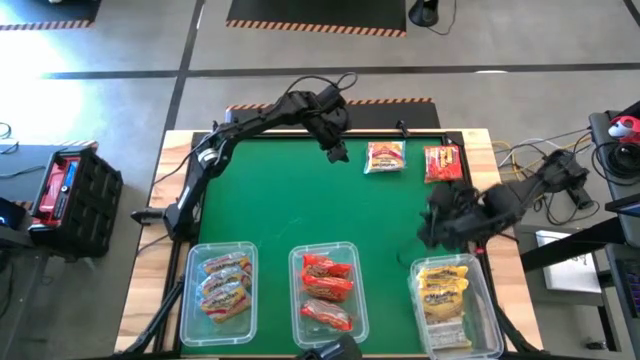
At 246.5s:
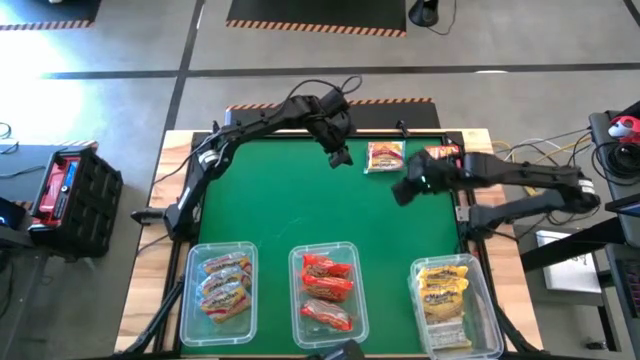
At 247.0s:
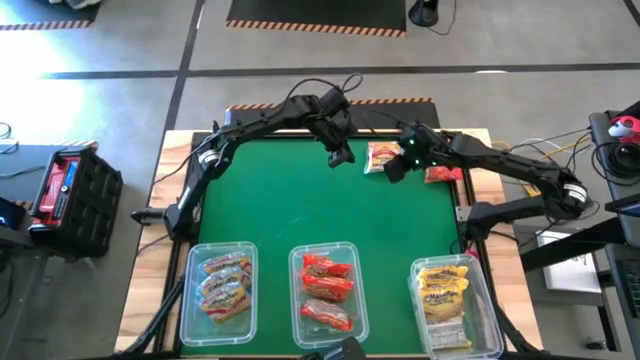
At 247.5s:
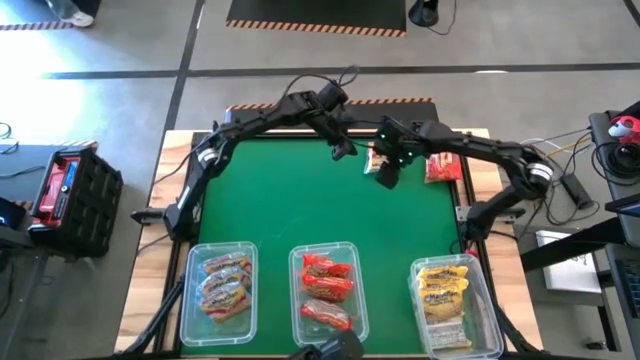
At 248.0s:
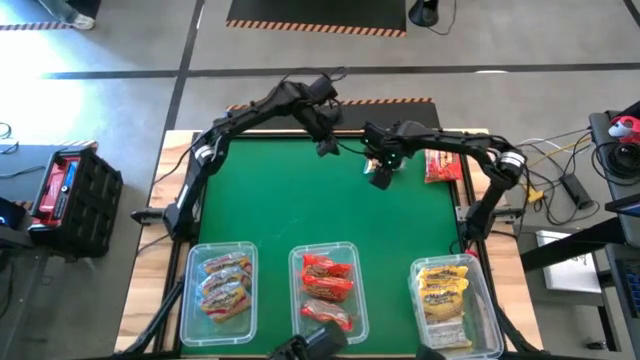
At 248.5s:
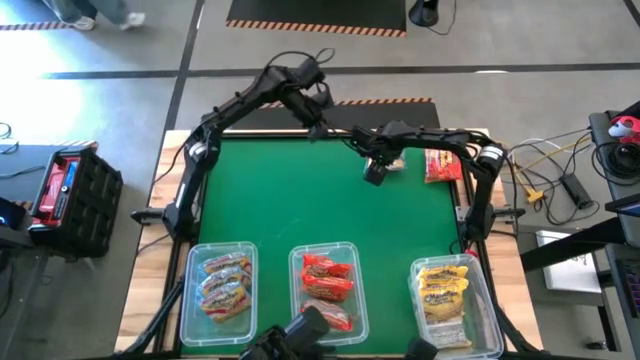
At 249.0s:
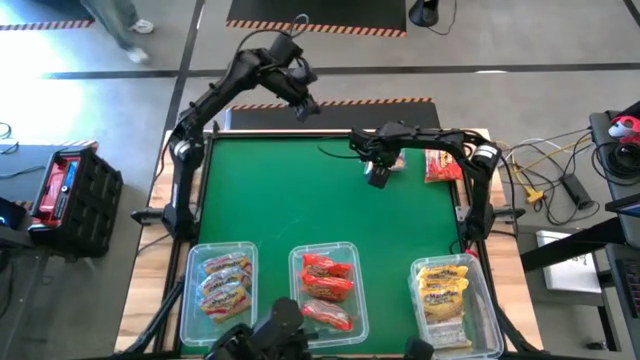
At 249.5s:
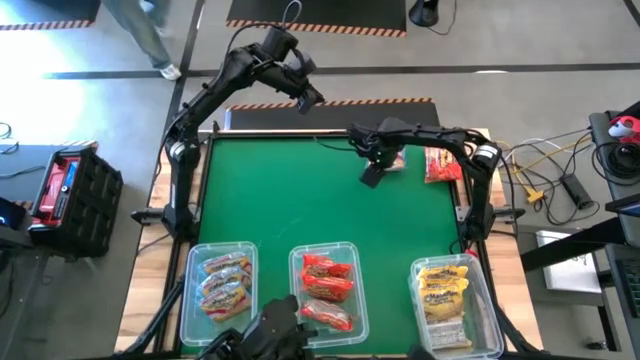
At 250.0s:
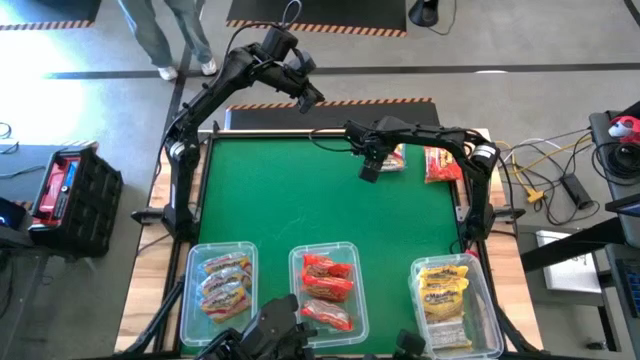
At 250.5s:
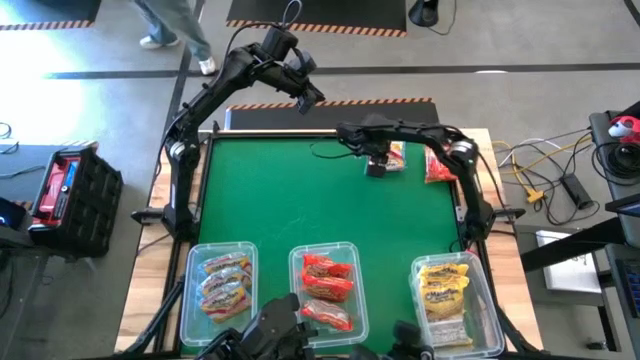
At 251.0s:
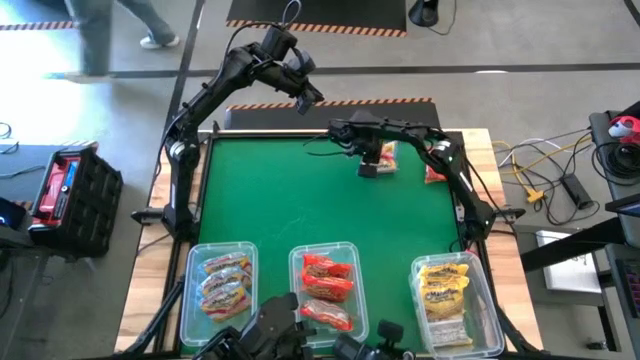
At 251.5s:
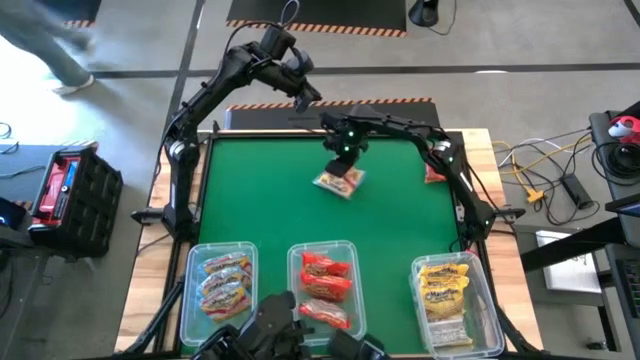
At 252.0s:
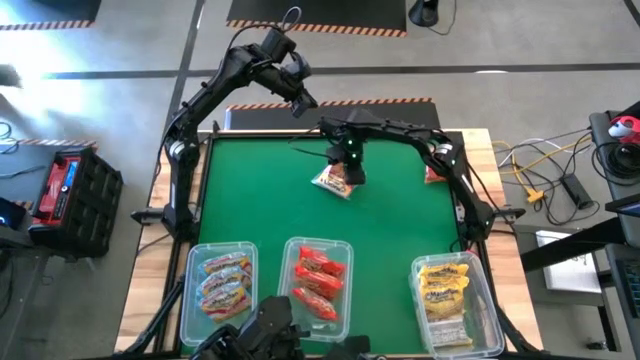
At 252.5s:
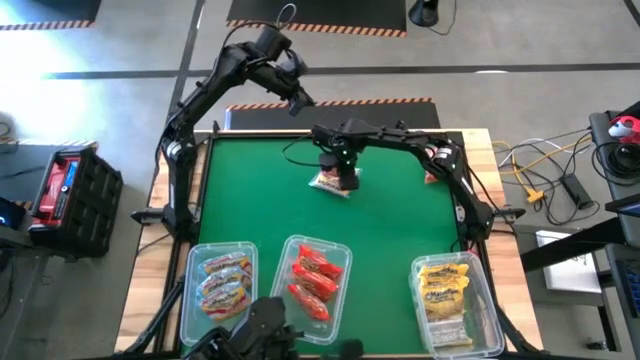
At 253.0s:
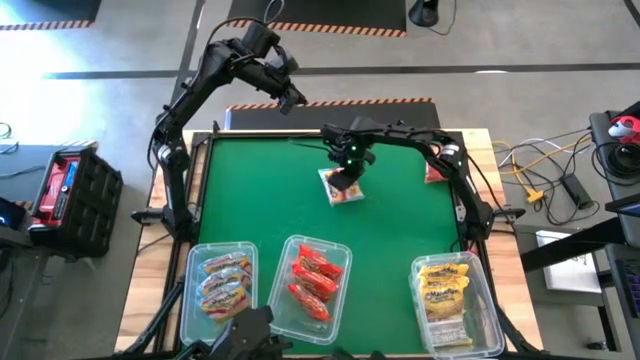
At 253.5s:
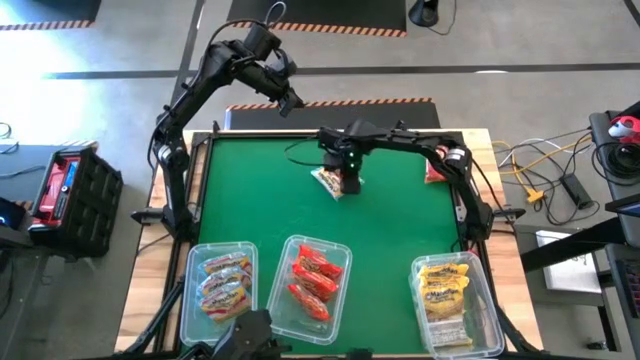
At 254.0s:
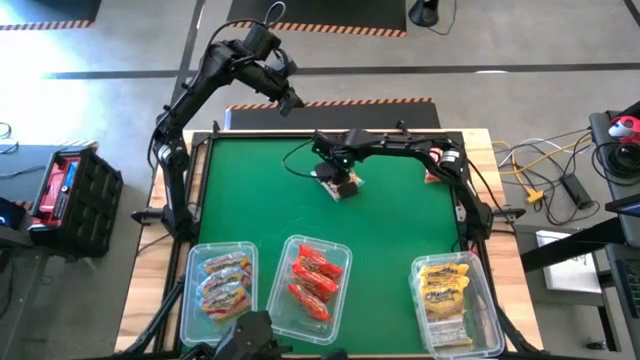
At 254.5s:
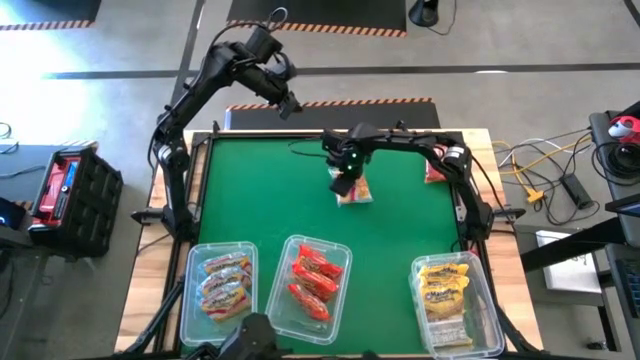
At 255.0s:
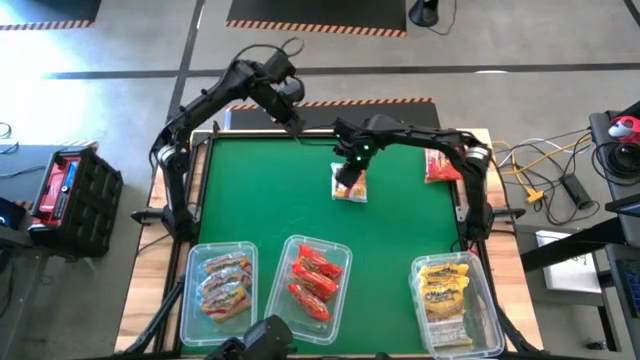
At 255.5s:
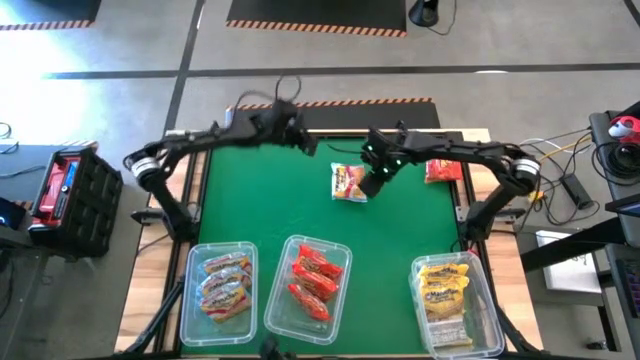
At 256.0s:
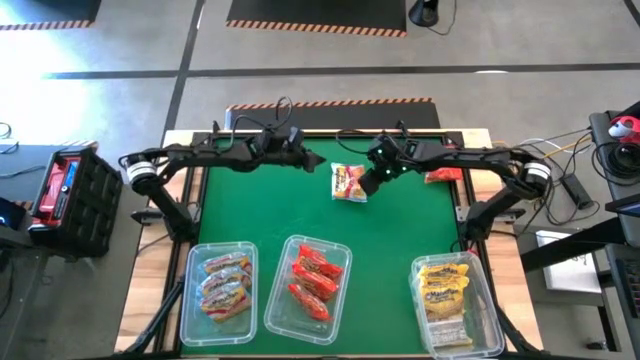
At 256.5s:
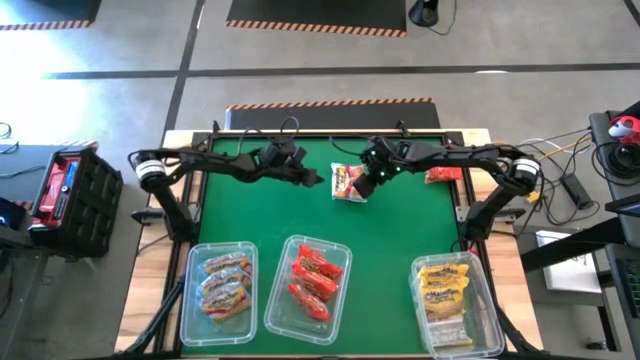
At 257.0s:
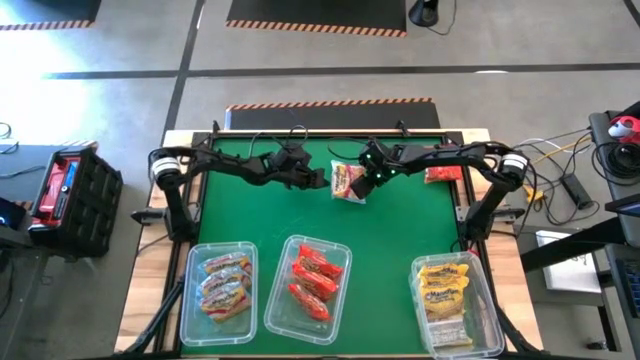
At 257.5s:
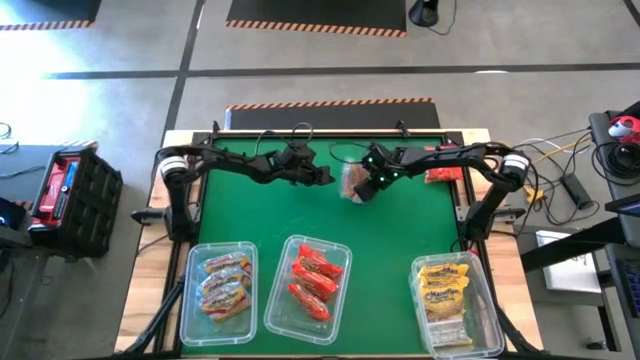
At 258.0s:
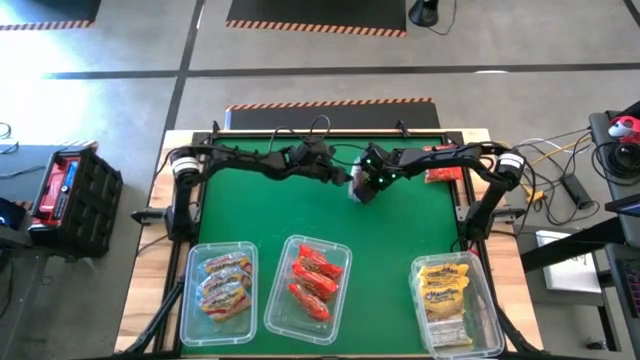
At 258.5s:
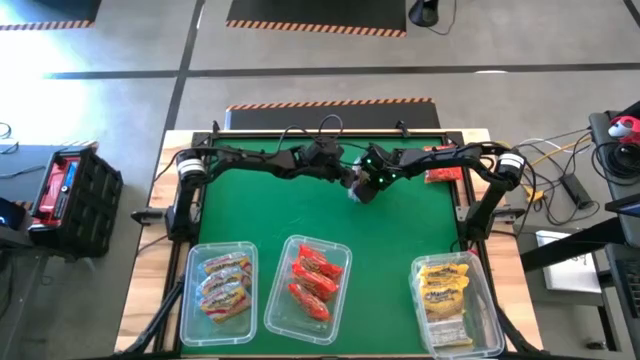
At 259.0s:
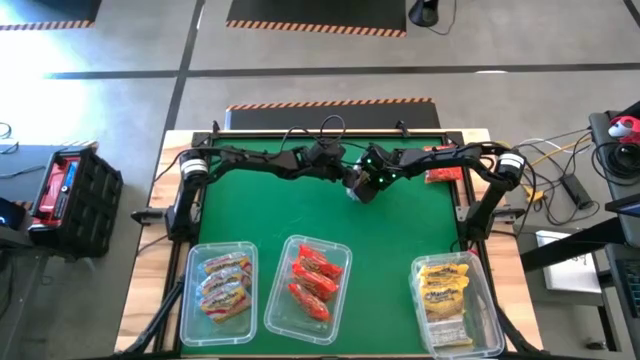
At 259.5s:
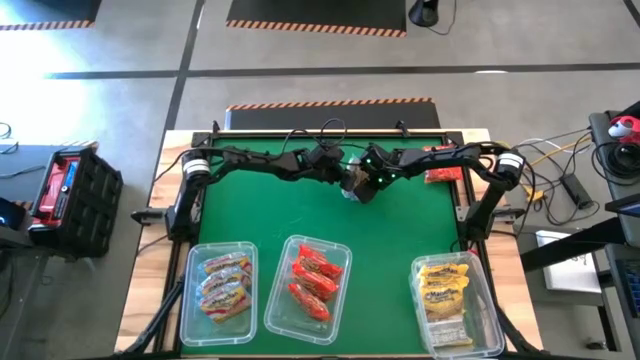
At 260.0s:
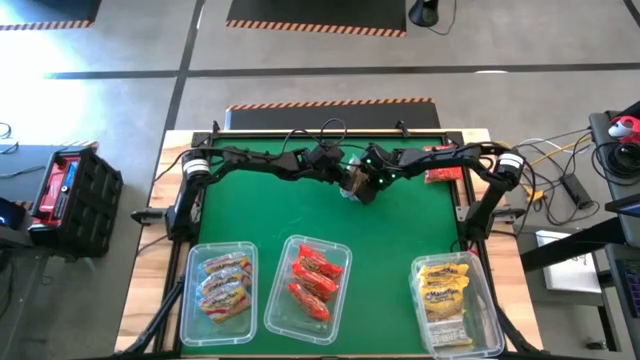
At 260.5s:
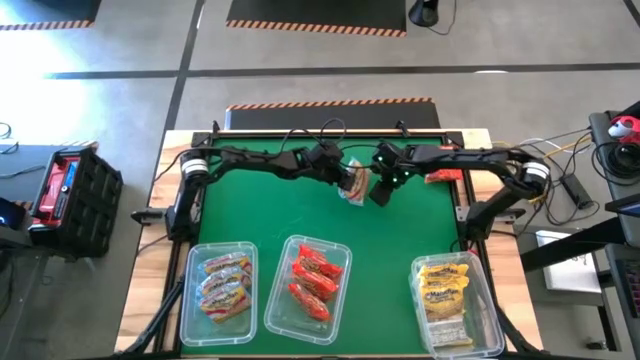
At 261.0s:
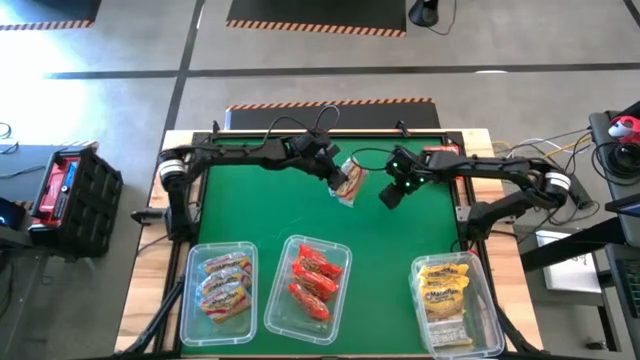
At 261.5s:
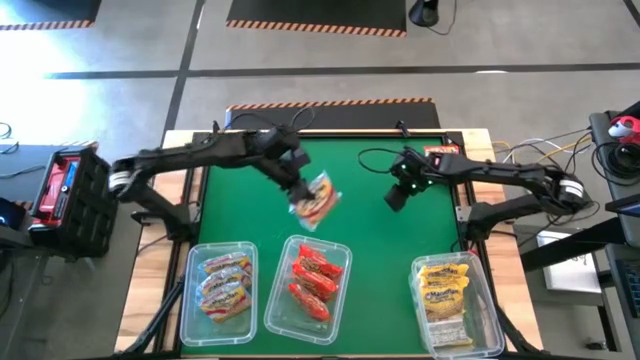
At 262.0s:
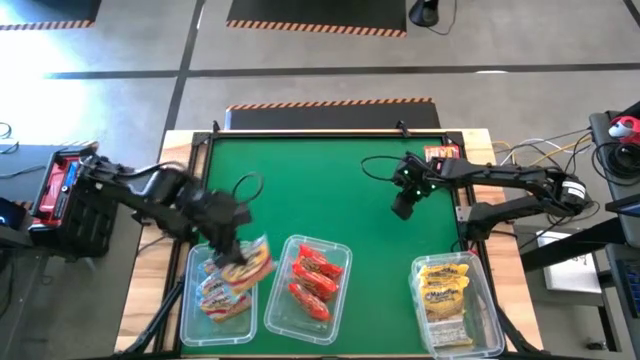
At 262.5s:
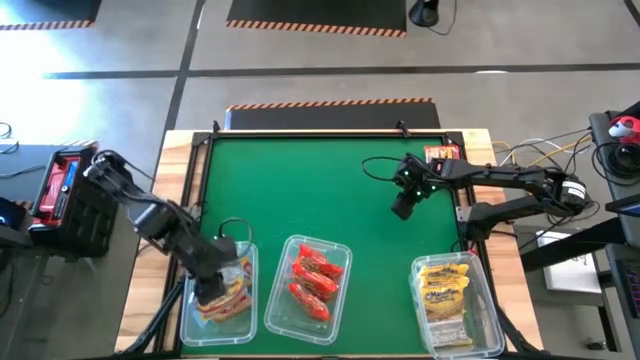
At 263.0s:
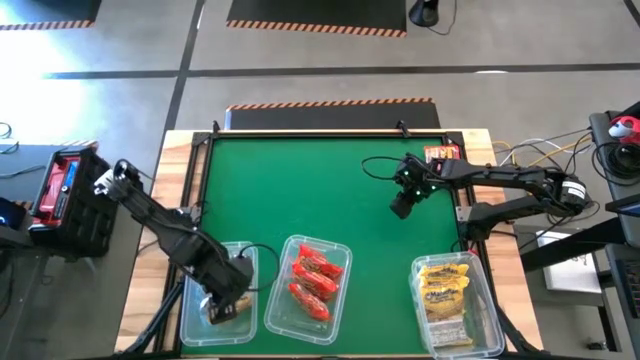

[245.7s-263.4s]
Task: Sort Maruchan noodles
Put the blue noodle pack into the left transparent bin

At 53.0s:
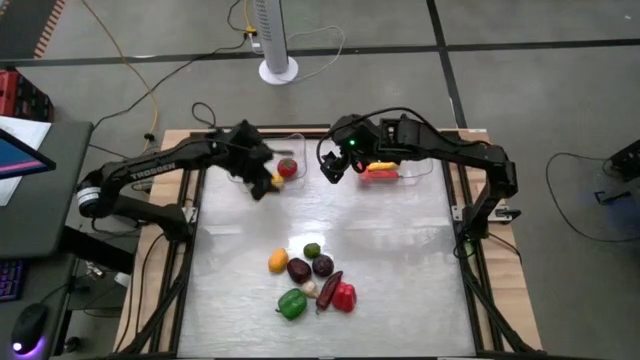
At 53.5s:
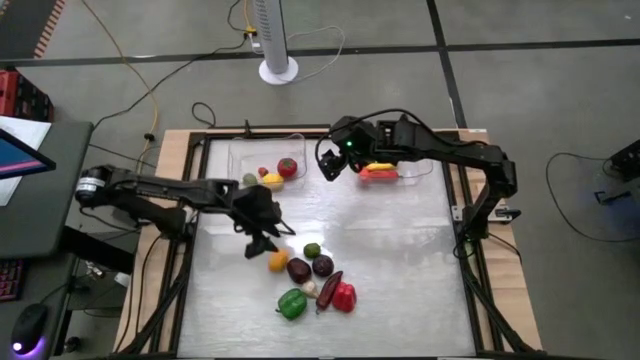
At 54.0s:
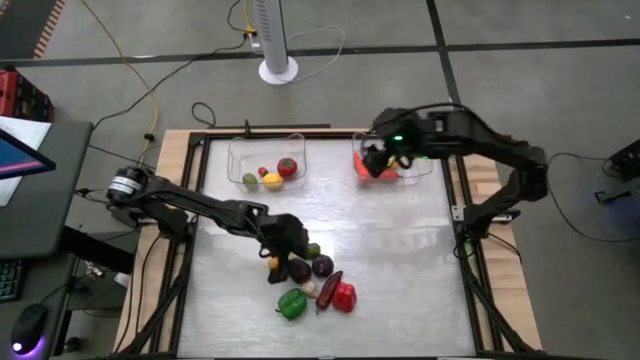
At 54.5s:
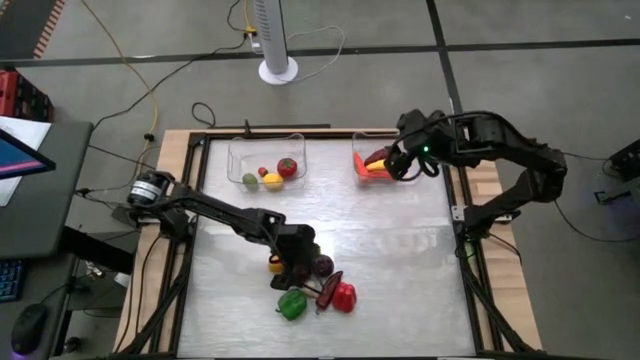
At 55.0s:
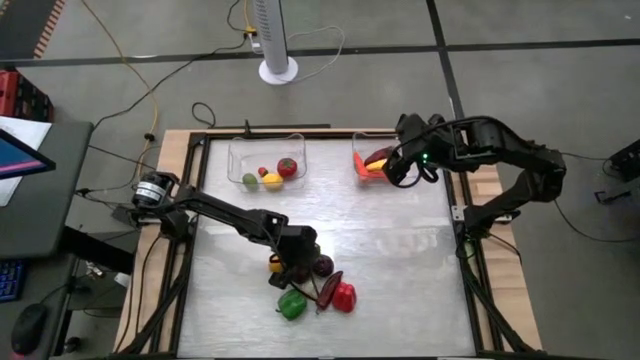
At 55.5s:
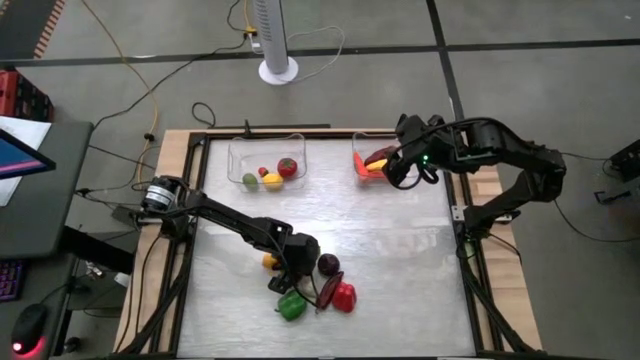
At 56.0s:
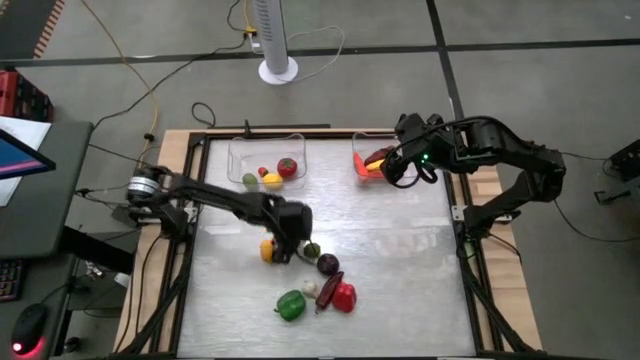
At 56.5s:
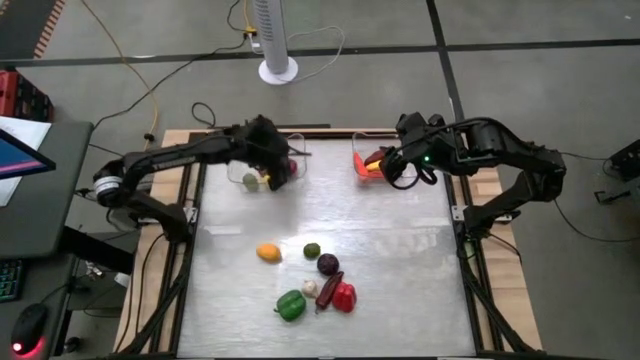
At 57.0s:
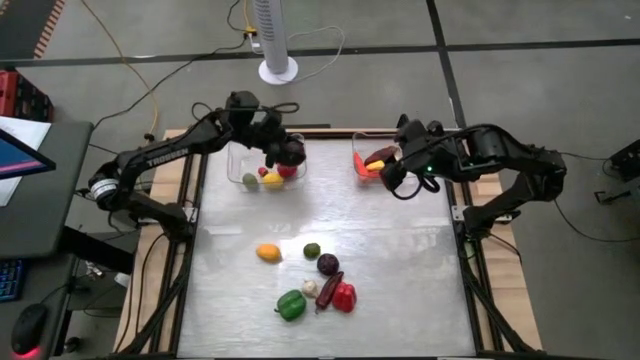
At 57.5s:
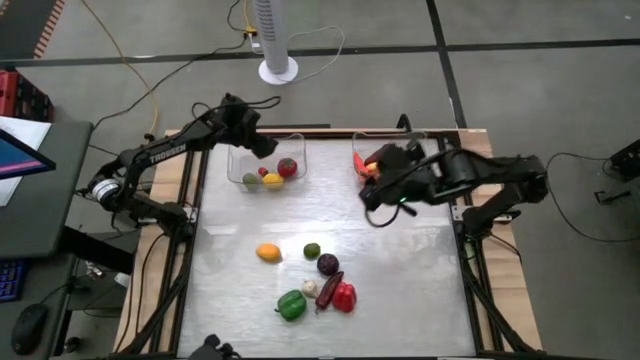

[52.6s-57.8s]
Task: Sort produce into baskets
Put the dark red apple into the left transparent bin
